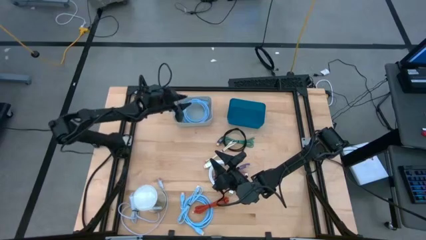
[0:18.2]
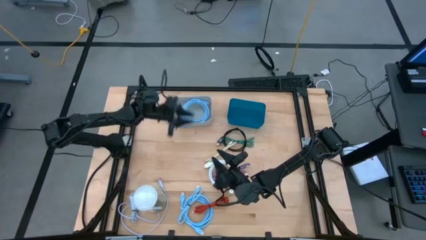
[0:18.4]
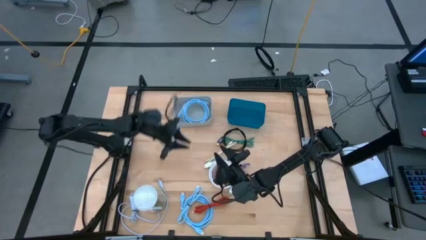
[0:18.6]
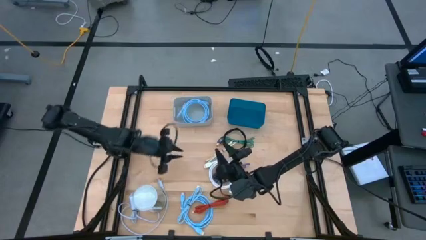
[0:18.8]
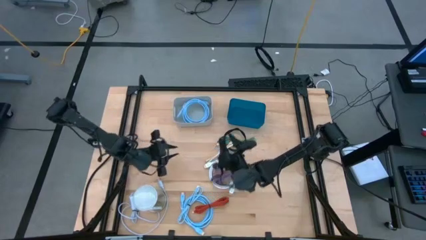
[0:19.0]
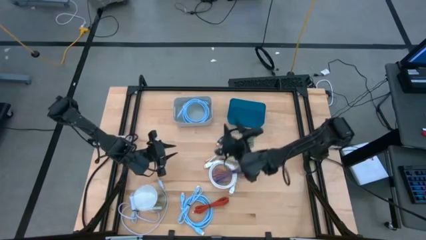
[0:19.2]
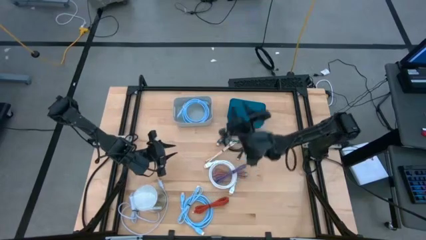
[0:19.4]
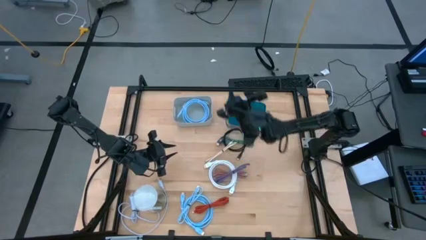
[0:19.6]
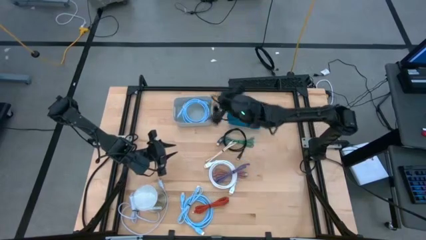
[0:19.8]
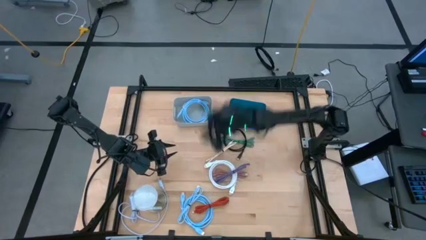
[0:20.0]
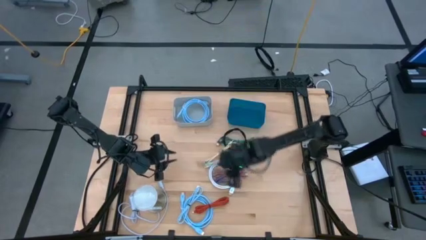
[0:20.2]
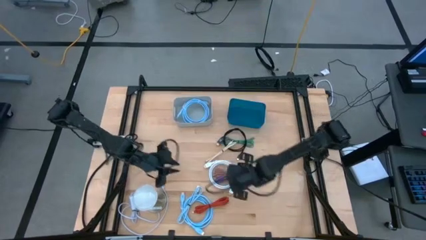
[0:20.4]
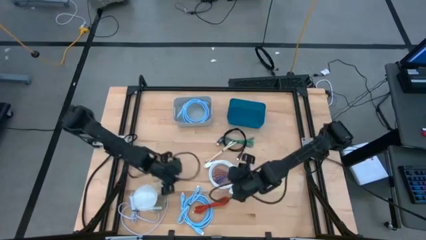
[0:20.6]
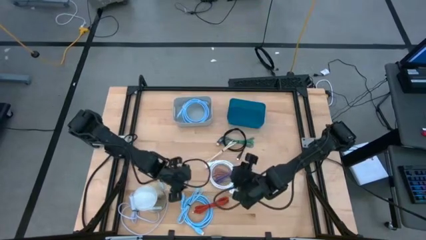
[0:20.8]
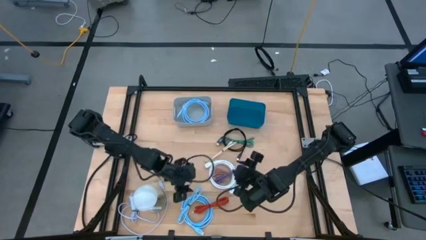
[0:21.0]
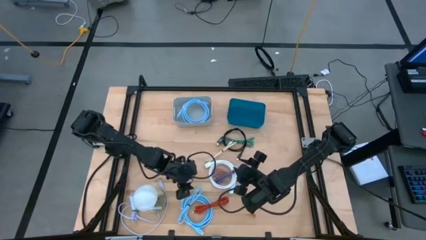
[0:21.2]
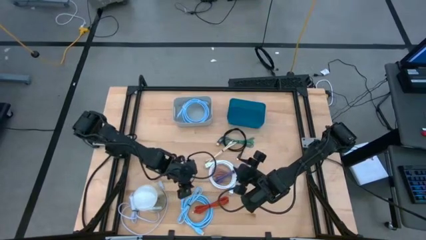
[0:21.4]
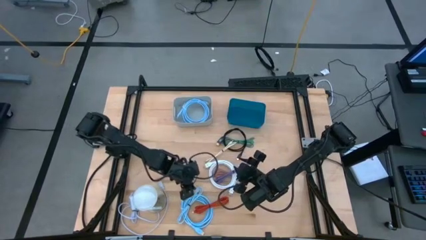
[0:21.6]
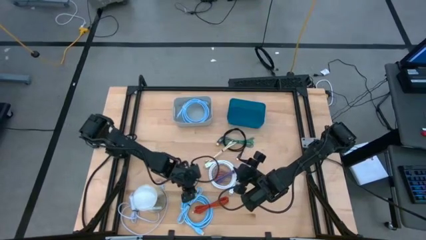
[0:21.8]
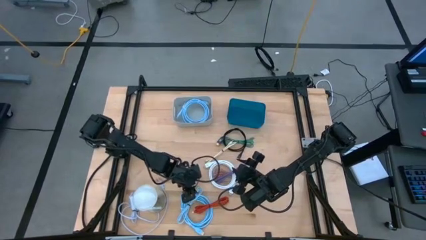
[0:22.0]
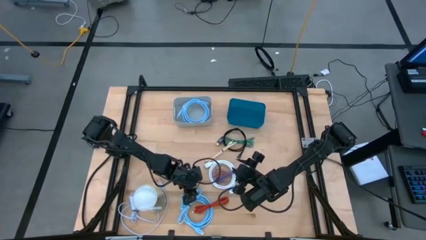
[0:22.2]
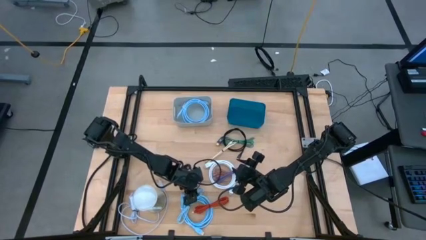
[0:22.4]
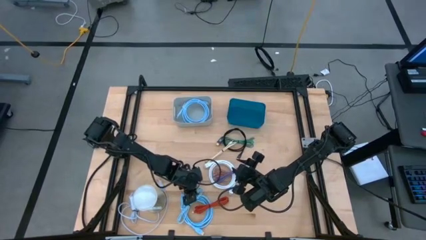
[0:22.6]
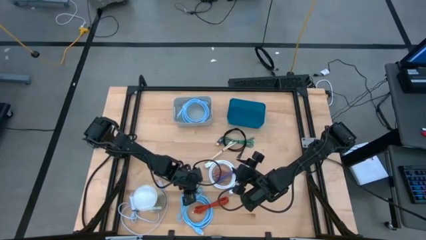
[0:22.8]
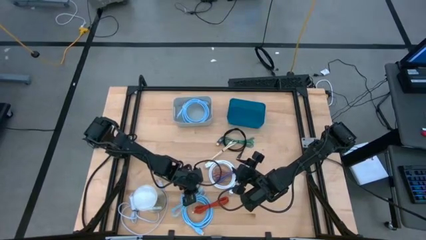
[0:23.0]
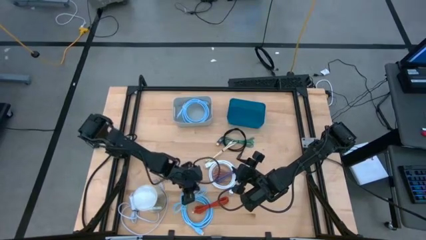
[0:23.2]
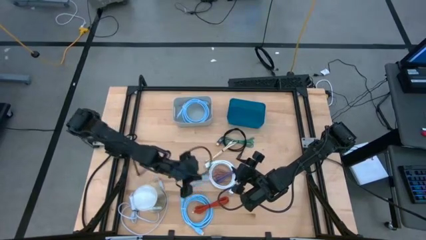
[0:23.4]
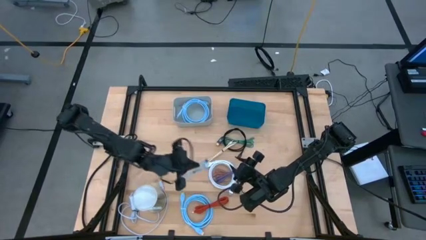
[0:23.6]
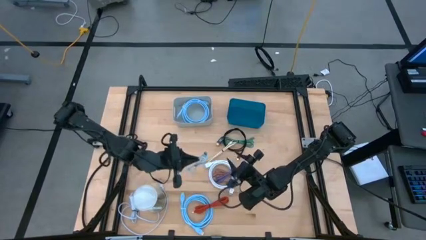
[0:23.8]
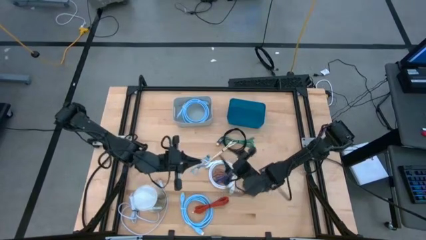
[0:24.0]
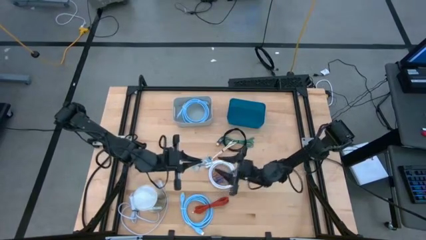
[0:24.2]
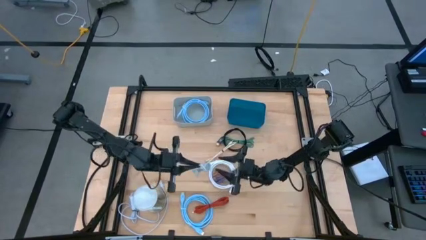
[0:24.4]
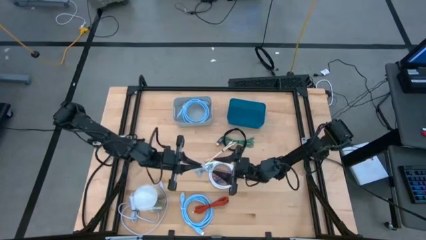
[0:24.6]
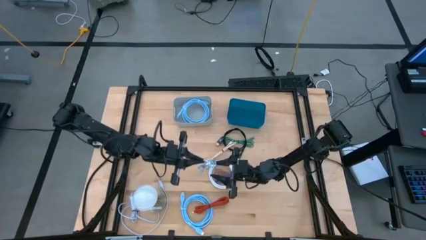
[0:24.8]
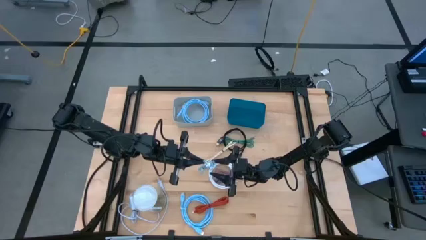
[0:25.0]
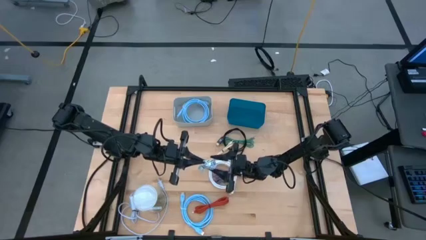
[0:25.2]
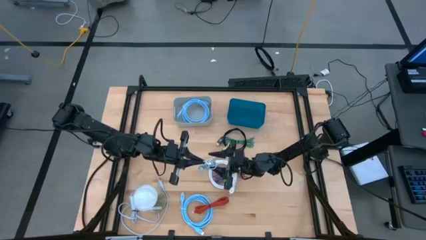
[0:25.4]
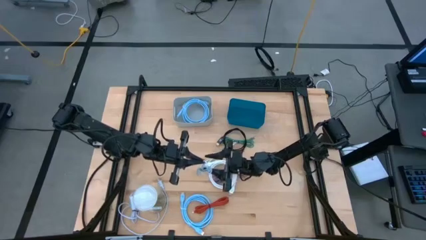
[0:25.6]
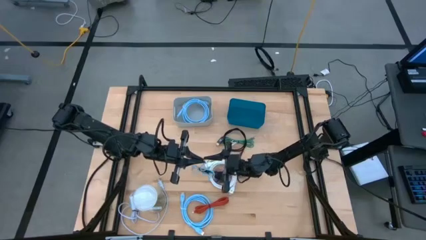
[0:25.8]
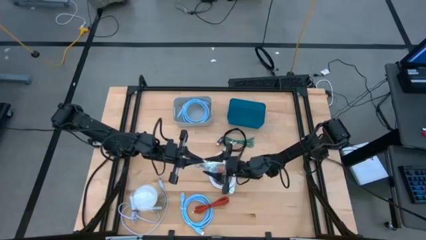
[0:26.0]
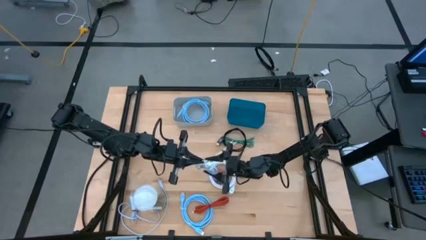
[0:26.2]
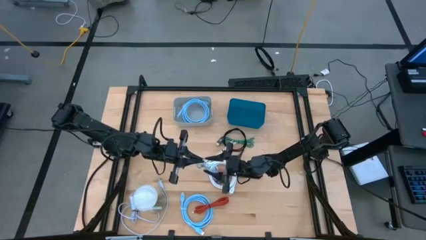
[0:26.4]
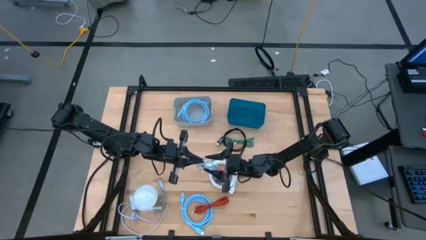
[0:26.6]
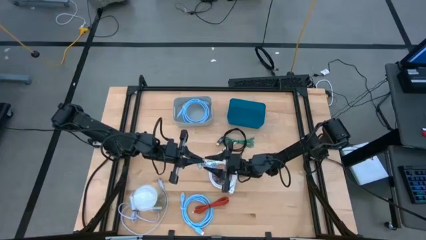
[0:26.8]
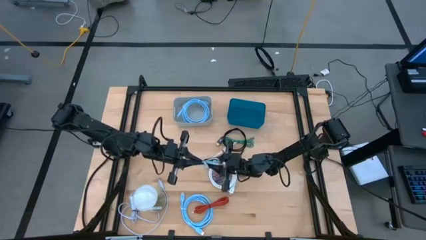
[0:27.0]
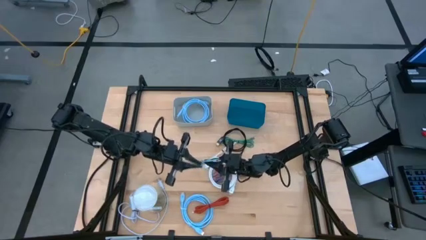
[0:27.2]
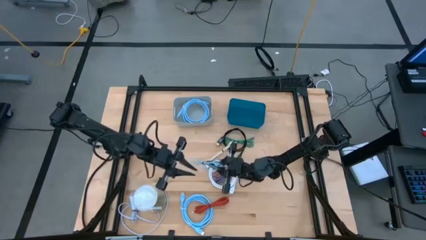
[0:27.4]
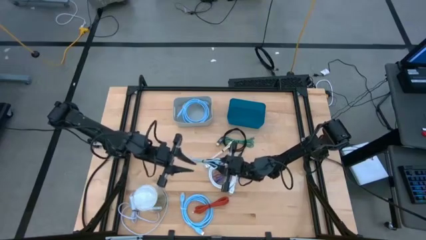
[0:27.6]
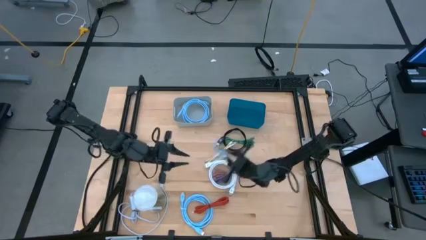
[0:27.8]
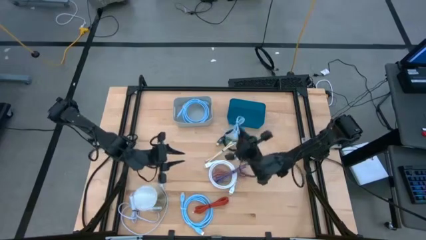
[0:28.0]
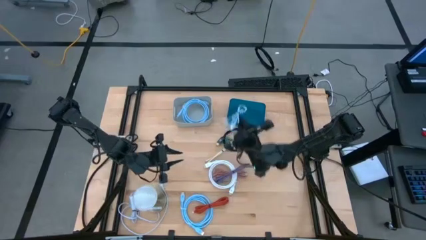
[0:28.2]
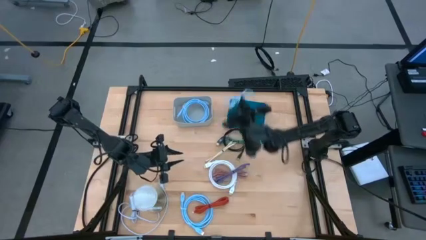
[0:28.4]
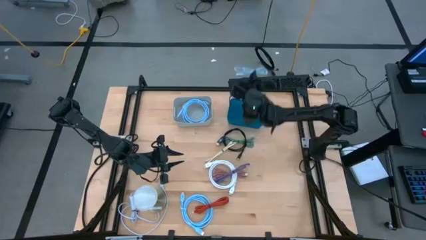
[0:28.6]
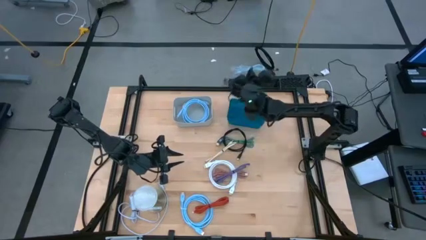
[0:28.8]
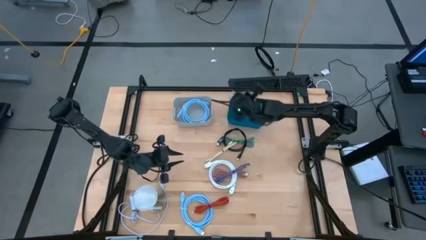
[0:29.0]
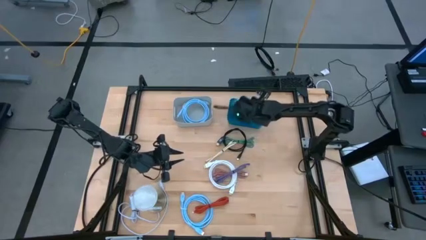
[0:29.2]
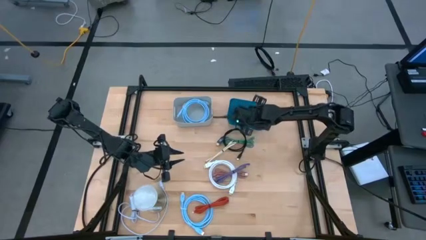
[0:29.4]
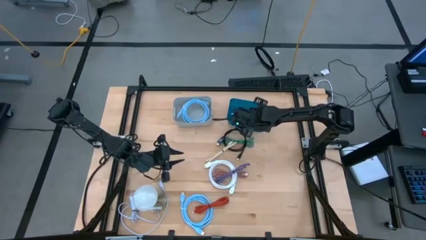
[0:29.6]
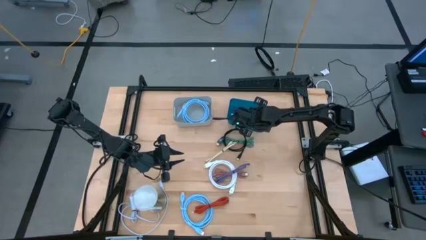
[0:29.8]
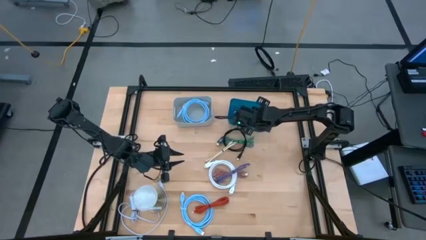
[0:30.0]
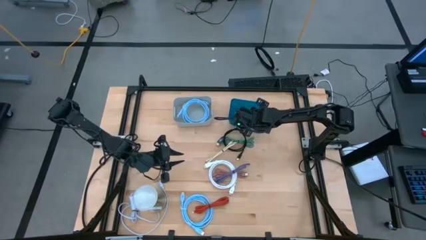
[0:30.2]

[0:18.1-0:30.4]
Task: Pick & Place USB Port
Put the blue charger cable into the blue bin

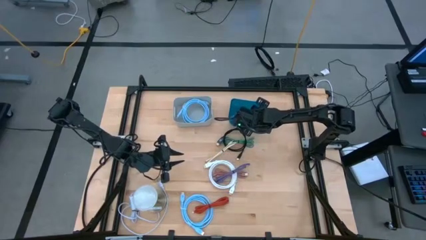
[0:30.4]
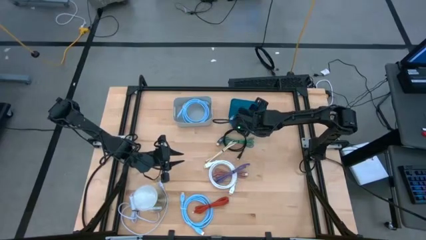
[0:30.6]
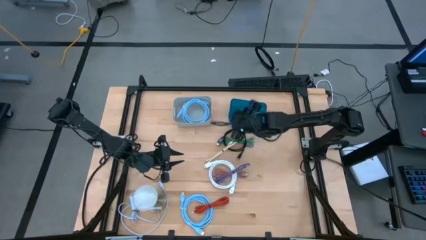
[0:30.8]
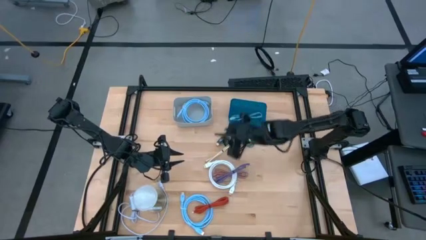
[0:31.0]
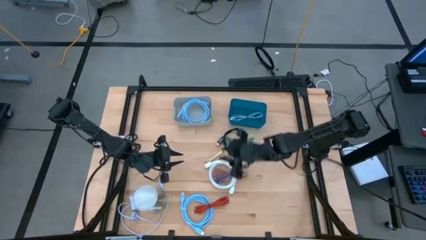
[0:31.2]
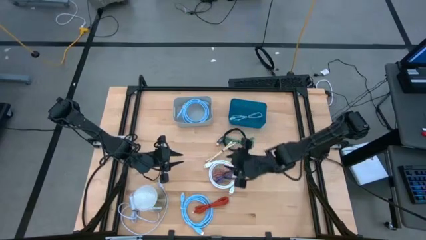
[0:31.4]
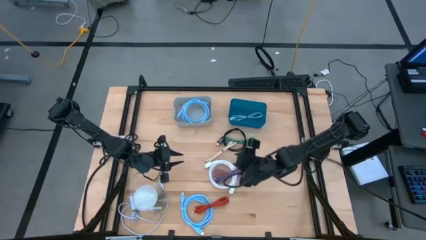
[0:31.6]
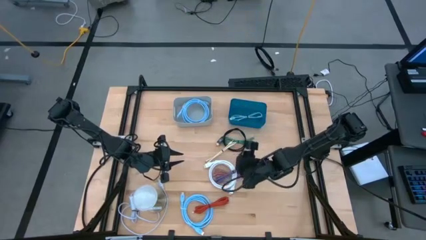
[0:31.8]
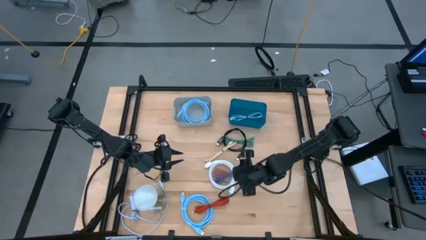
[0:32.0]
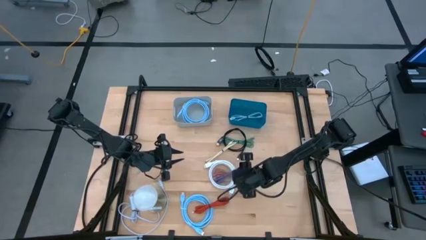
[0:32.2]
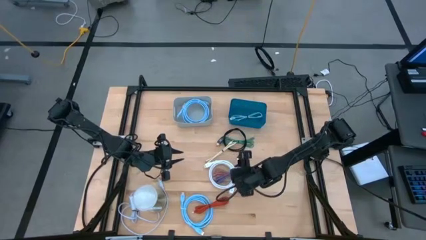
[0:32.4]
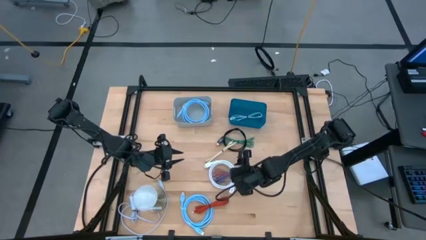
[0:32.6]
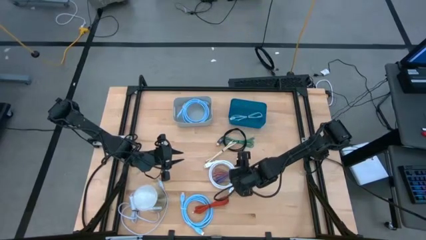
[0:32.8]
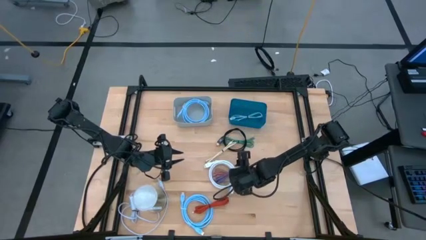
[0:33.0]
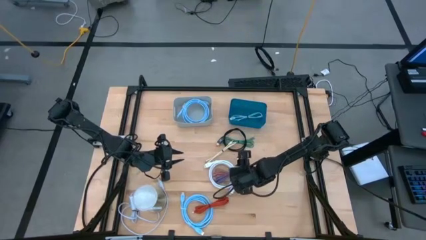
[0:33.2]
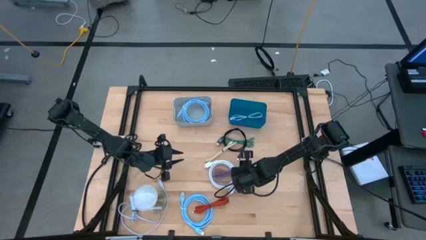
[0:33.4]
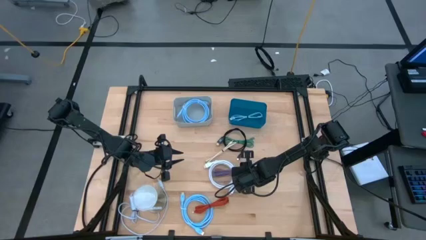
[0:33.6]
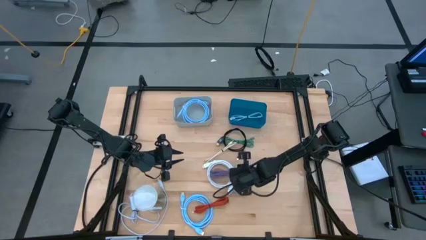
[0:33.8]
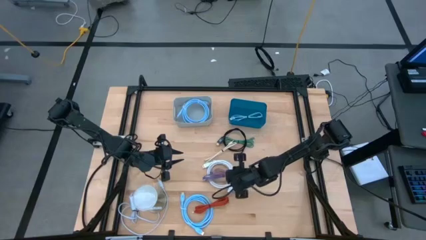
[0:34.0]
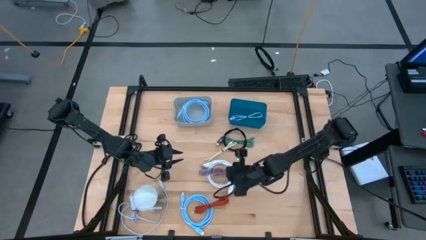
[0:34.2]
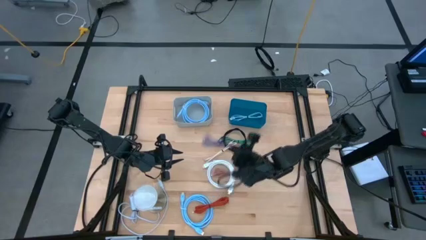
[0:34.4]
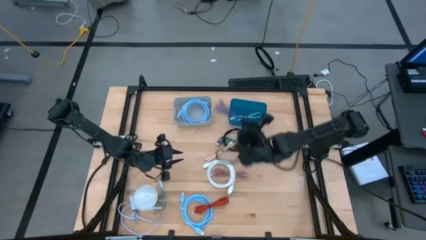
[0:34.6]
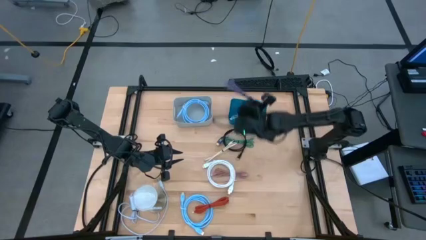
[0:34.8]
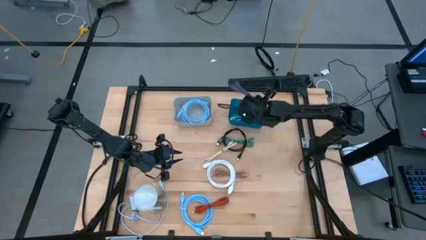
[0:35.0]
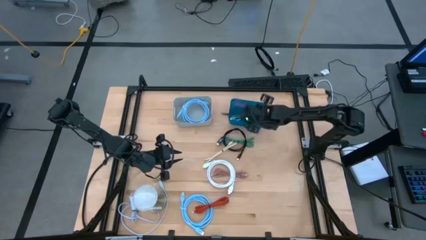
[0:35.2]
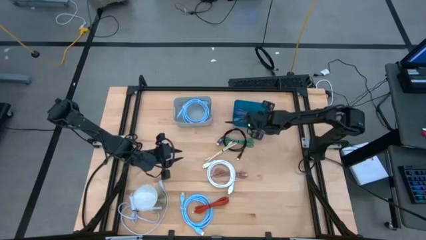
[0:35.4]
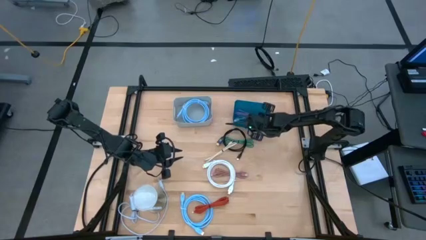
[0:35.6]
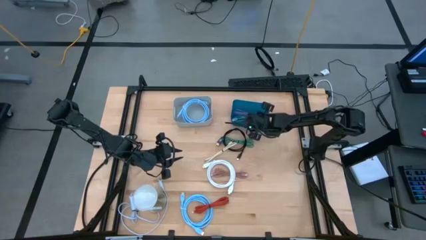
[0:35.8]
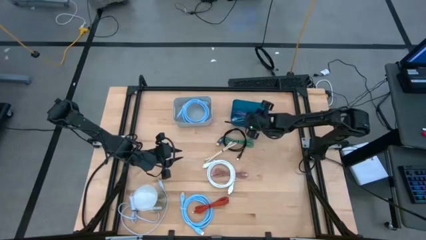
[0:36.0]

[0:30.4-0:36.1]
Put the violet charger cable into the blue bin
